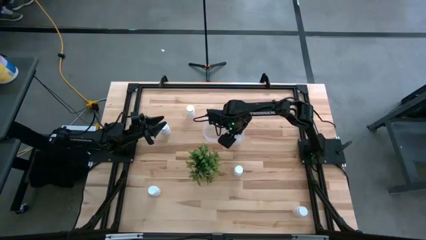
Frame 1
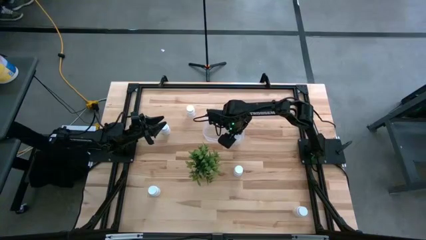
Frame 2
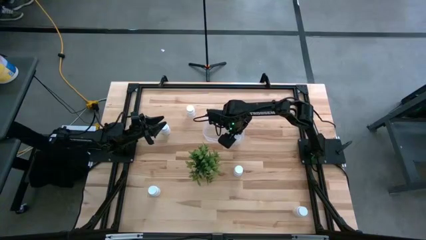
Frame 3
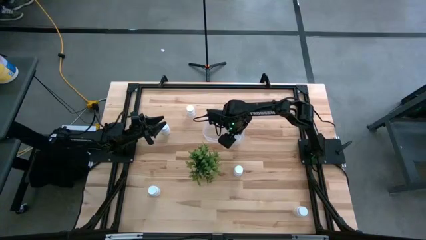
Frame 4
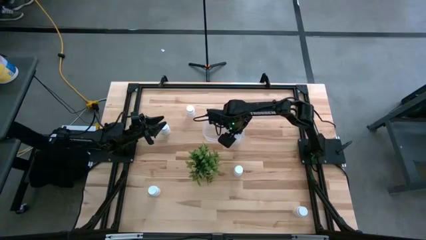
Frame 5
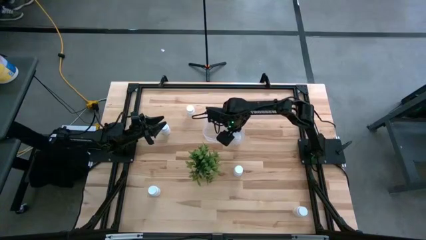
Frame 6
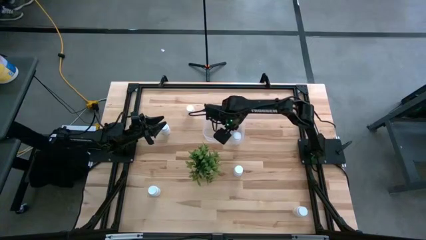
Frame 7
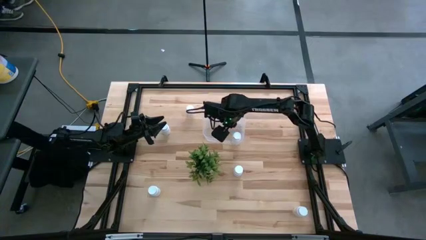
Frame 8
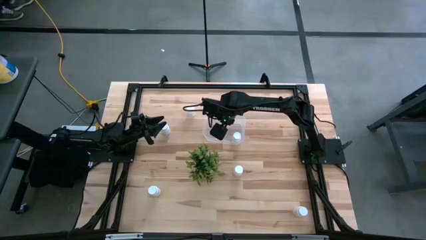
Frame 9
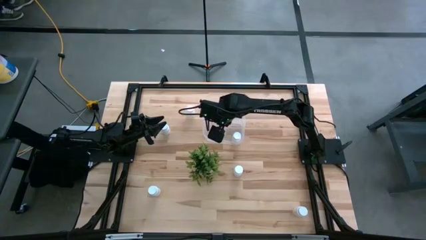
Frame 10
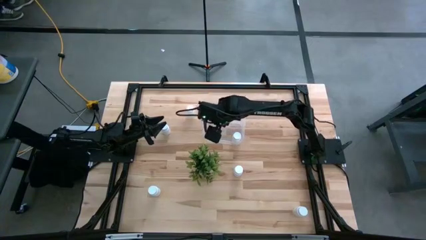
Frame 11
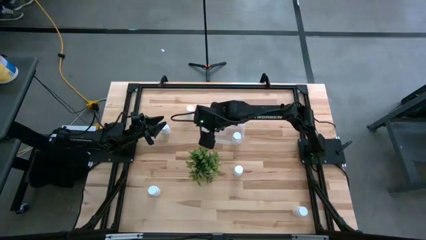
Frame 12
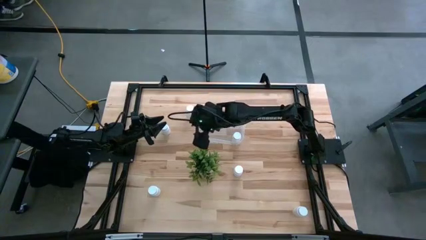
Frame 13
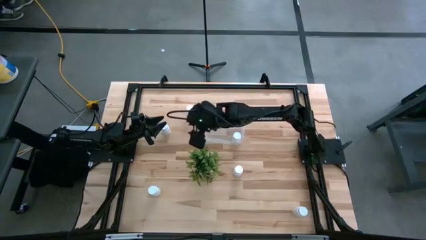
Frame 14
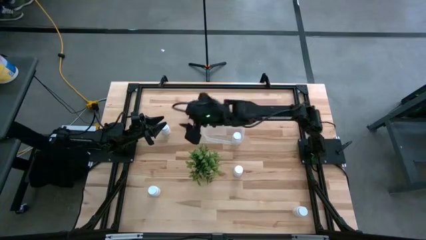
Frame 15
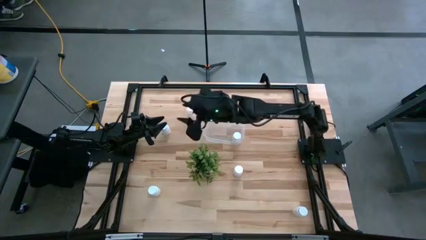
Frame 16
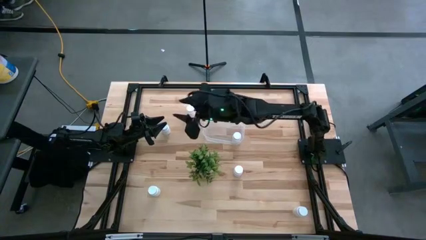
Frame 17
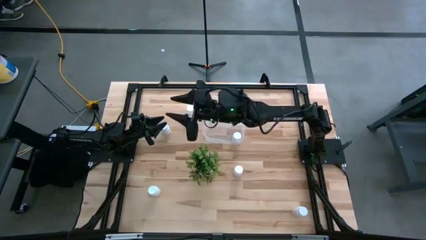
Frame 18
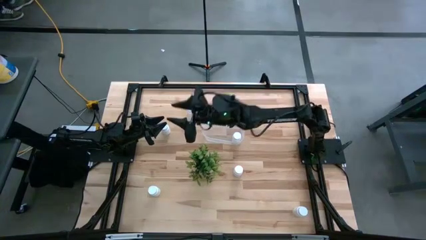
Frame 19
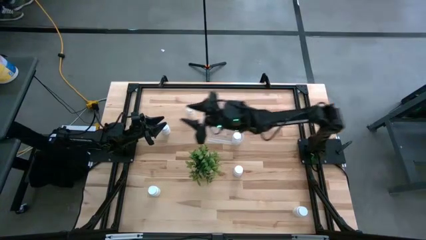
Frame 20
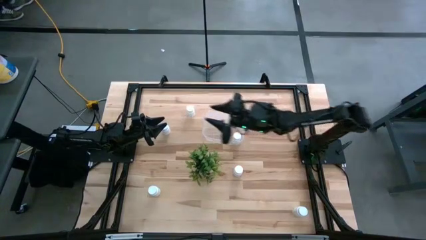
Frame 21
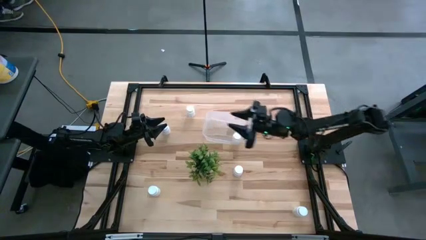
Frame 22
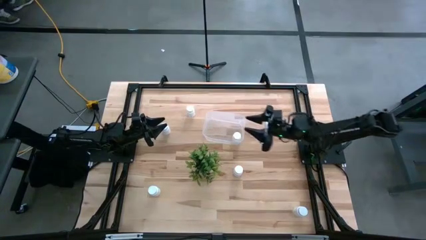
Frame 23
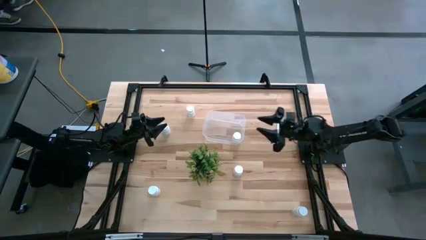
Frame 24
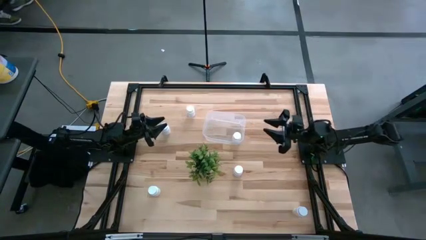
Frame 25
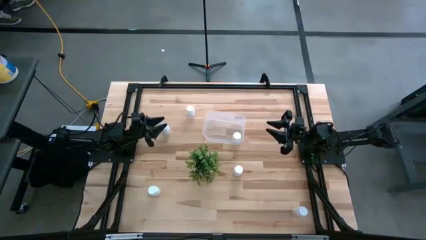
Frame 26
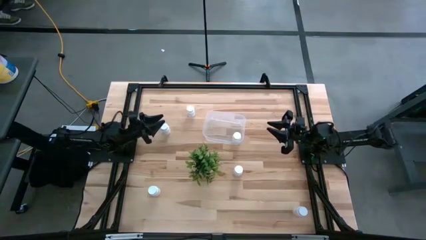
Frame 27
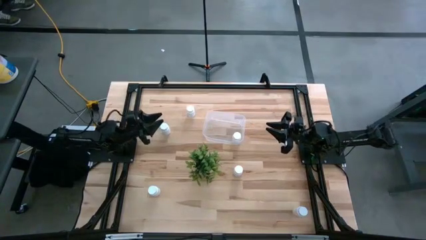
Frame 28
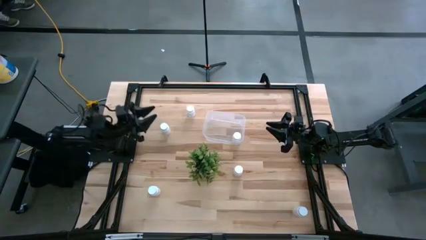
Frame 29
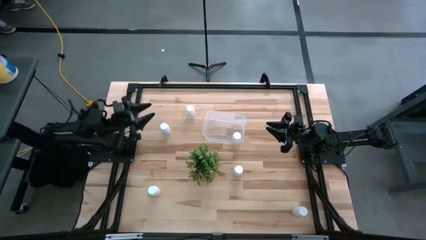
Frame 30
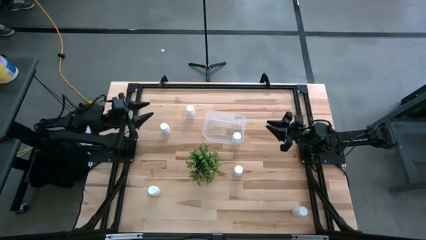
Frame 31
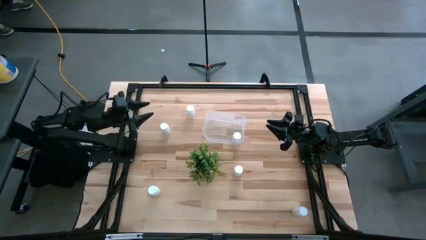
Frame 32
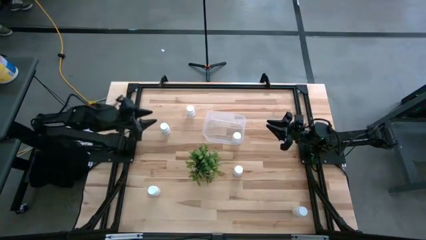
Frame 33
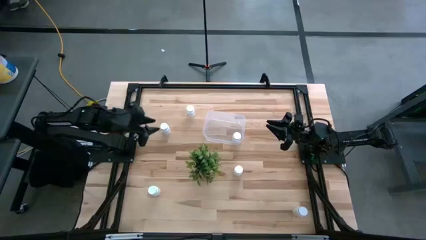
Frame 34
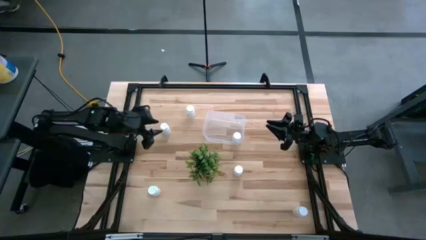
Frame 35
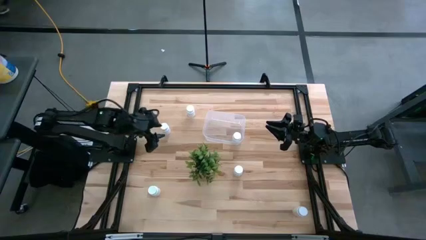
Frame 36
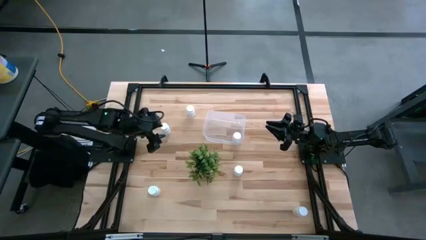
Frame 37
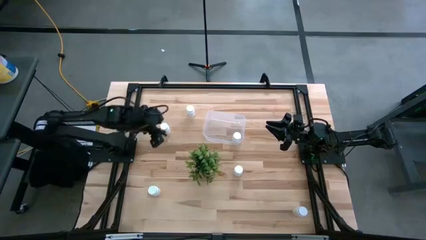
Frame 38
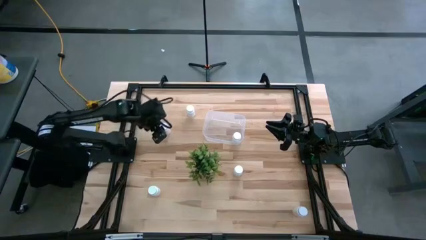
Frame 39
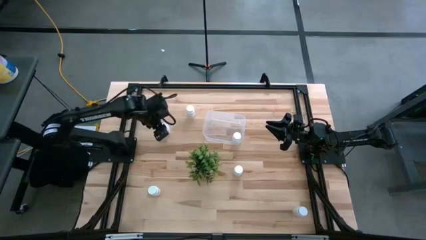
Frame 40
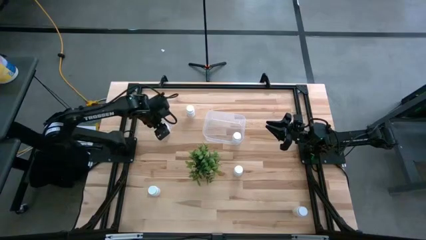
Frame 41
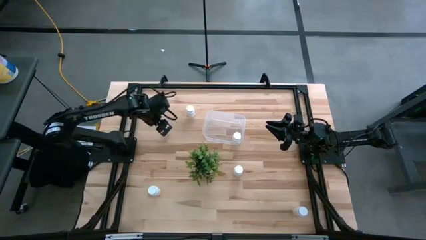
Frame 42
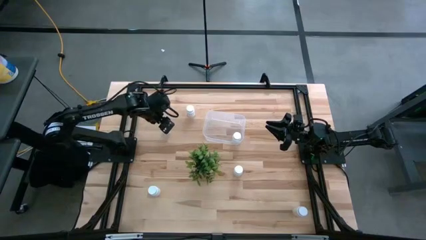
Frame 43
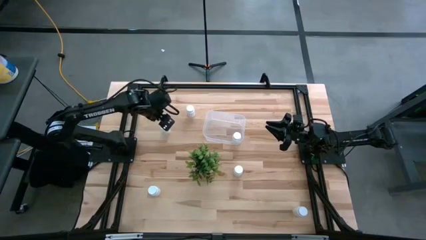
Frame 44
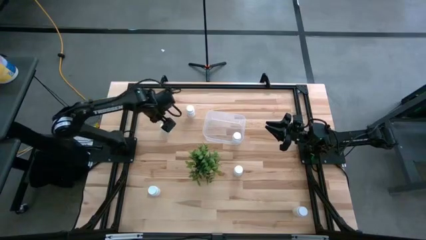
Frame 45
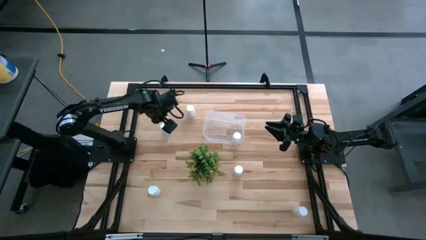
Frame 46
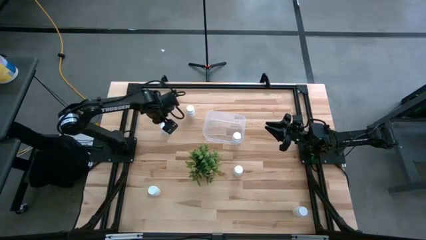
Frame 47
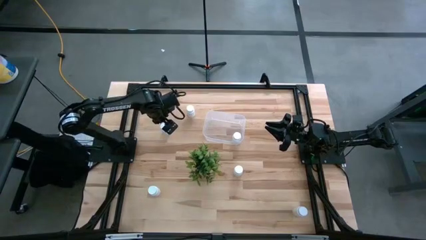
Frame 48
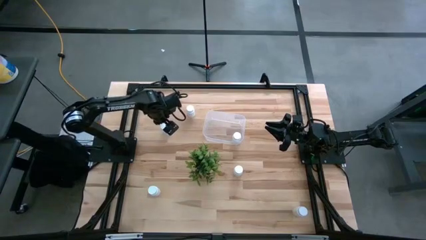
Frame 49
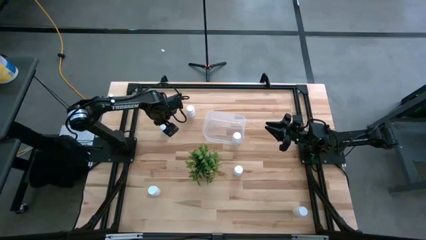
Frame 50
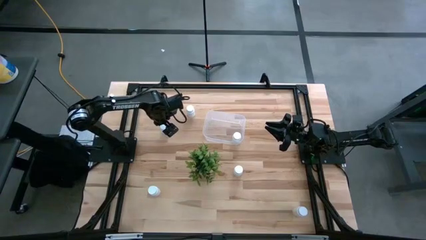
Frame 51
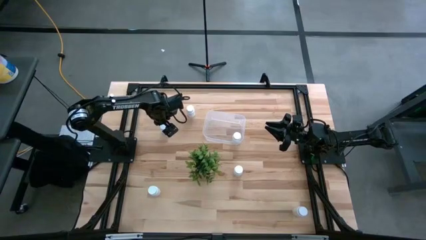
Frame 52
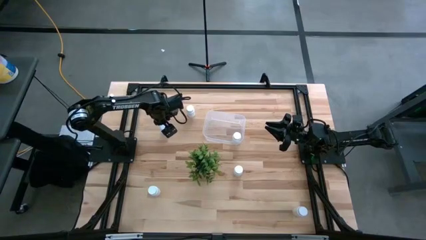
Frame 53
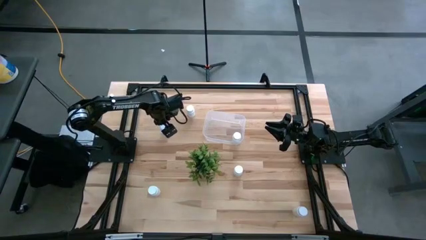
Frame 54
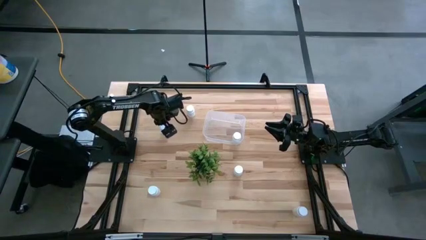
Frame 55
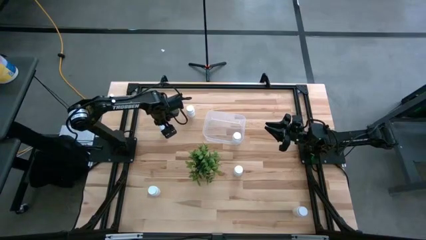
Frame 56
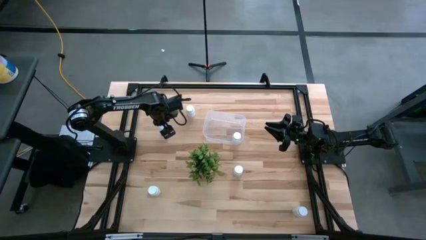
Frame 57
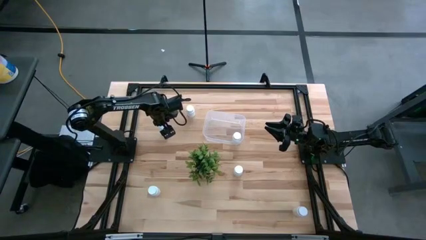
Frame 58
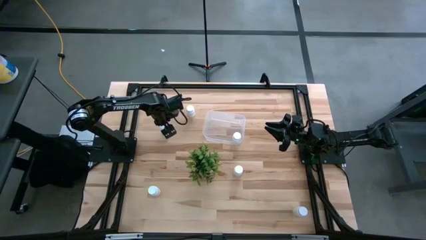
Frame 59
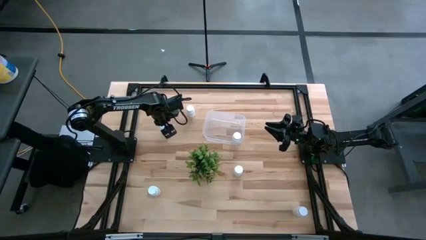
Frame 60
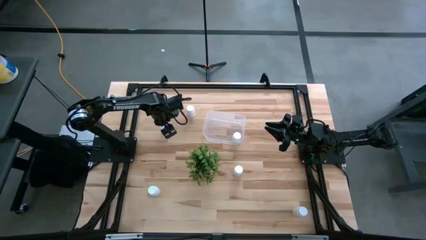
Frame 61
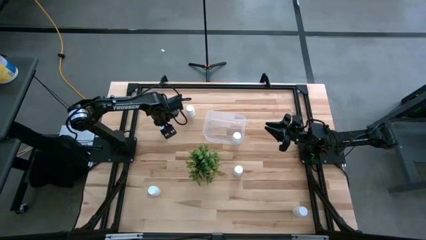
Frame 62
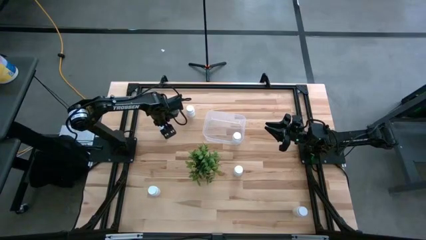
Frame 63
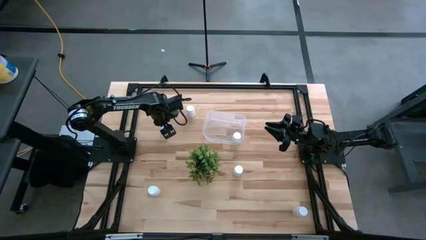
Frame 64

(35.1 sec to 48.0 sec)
Task: Pick and place pill bottles into a basket
Put the white pill bottle in the transparent bin
